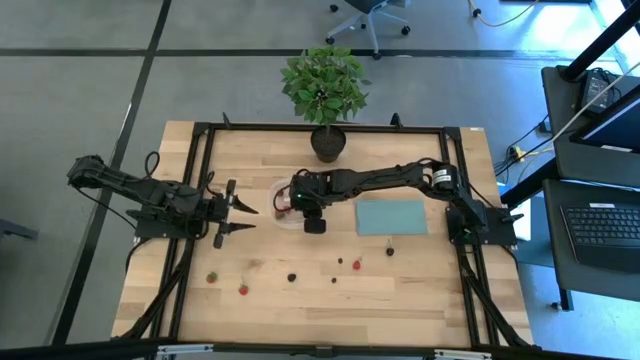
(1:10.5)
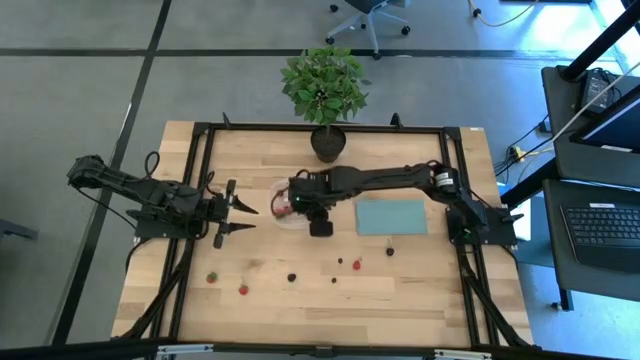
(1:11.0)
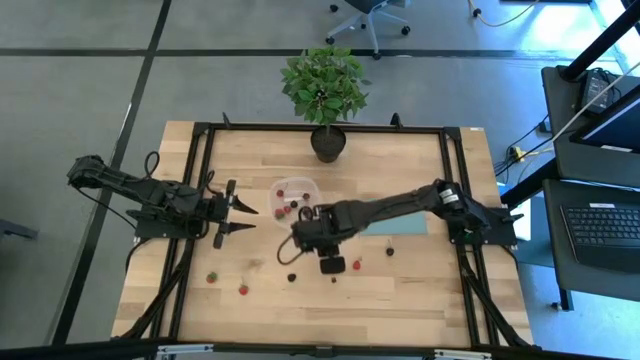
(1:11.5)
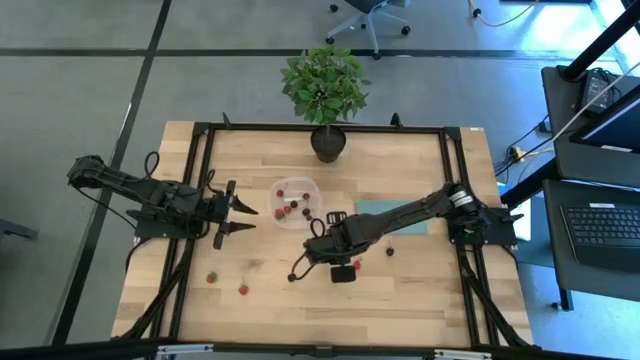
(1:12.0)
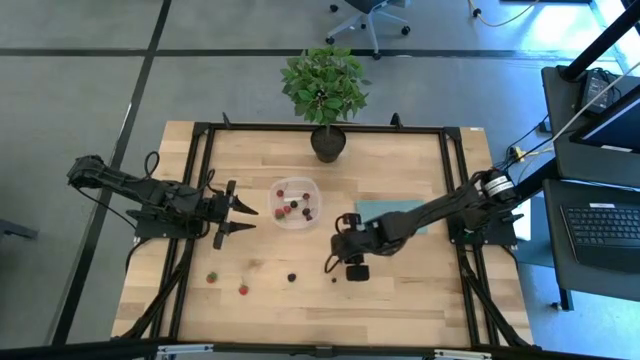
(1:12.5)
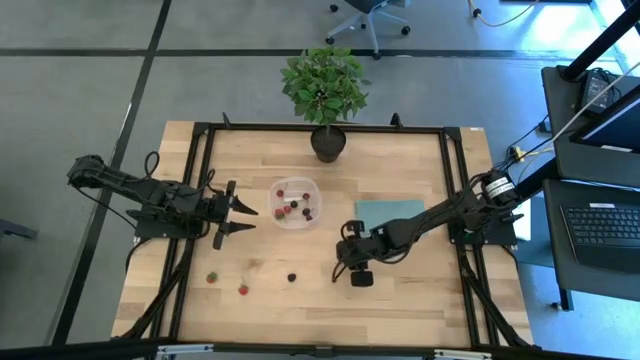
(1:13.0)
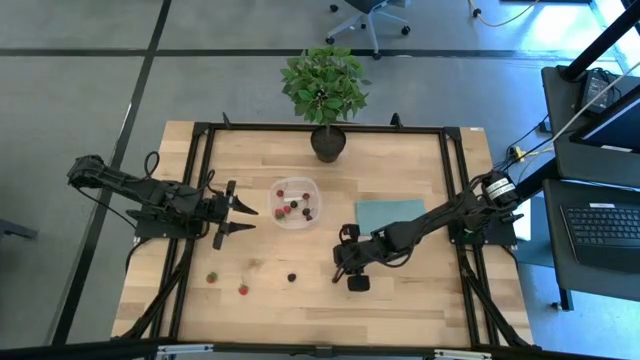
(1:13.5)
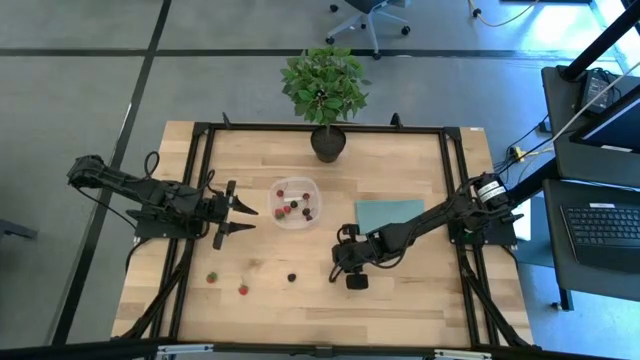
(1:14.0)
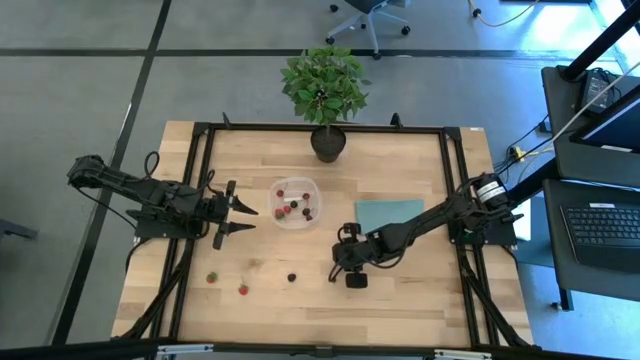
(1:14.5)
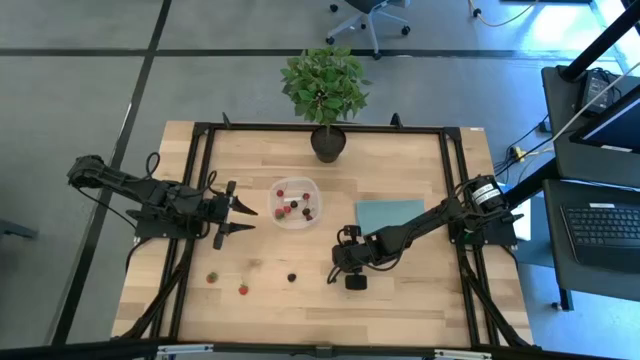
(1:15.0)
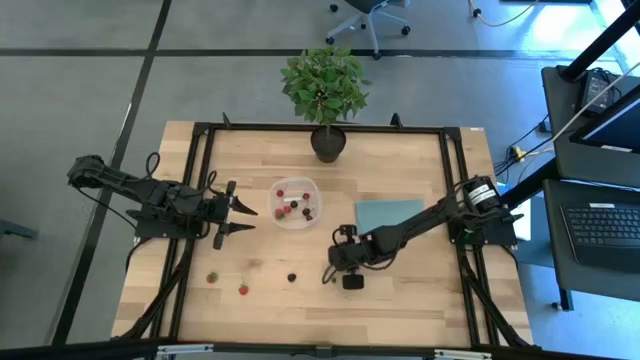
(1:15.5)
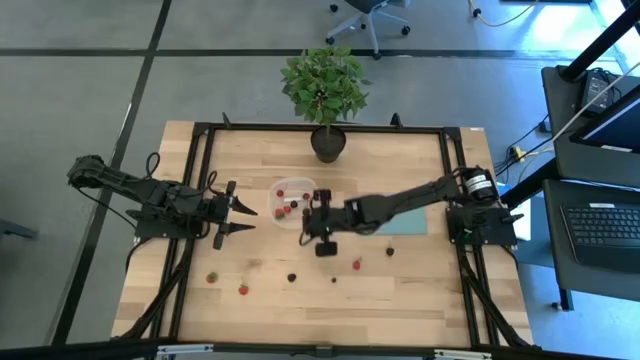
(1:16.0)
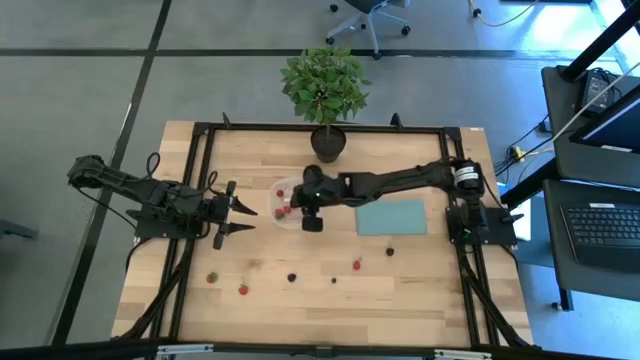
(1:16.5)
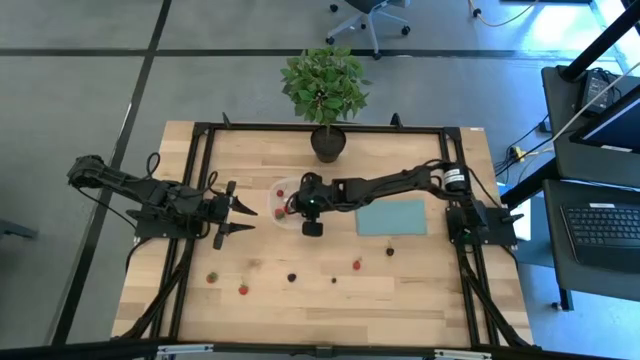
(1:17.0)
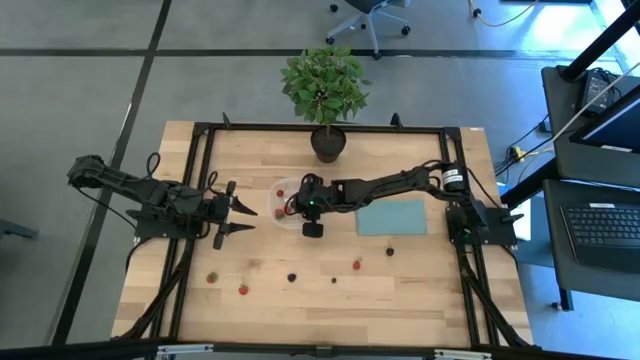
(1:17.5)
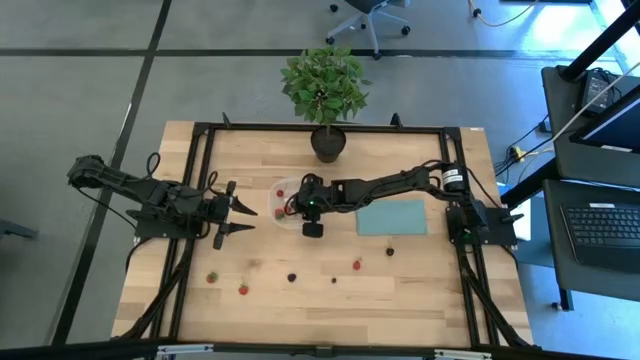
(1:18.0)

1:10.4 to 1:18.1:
Task: Pick and placing Produce into tupperware
Put the top blueberry into the container

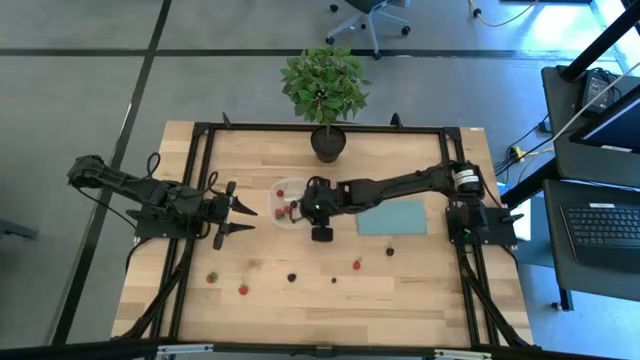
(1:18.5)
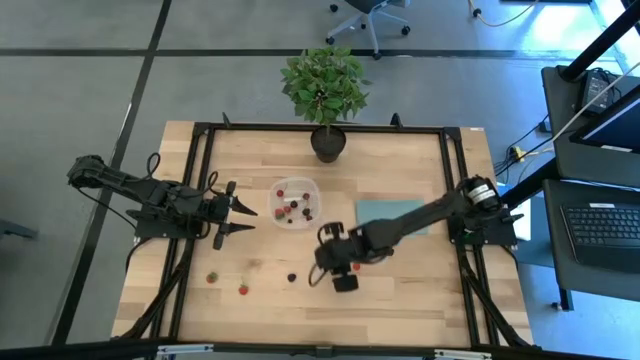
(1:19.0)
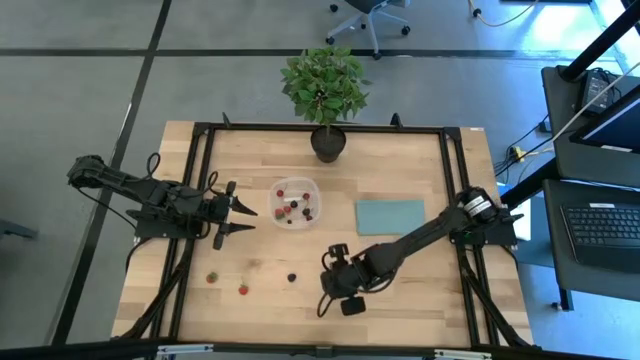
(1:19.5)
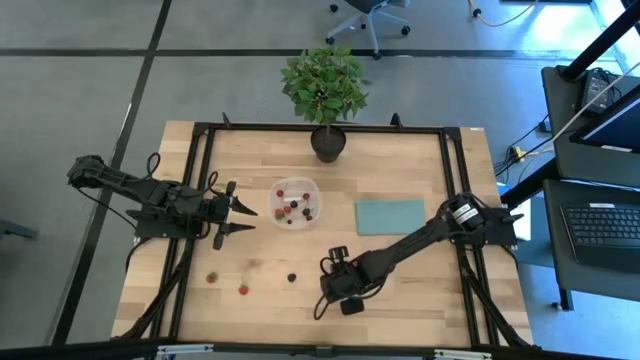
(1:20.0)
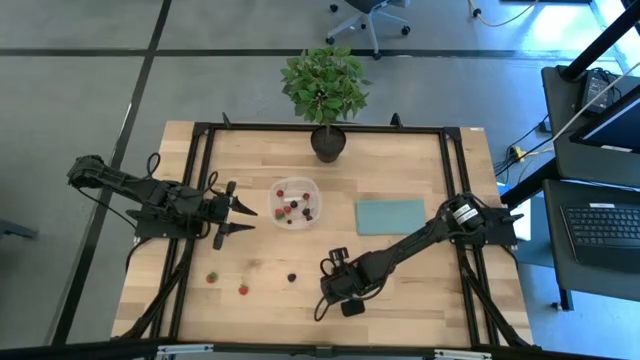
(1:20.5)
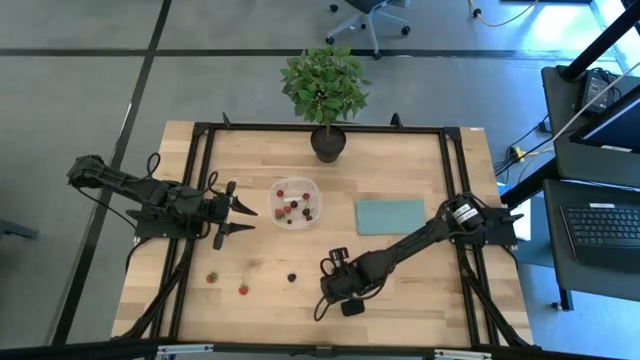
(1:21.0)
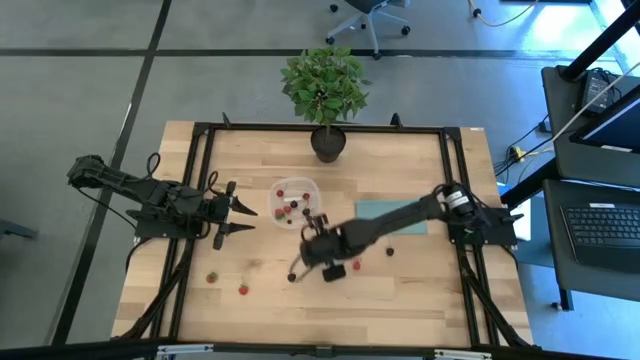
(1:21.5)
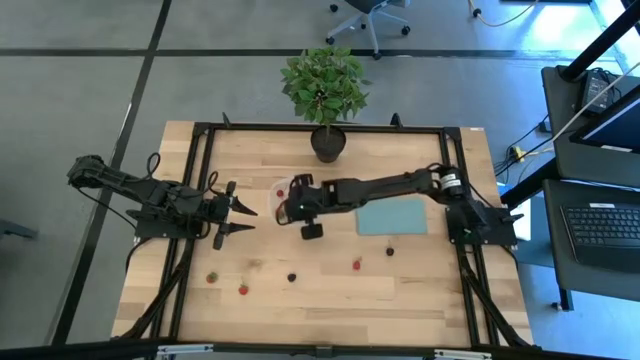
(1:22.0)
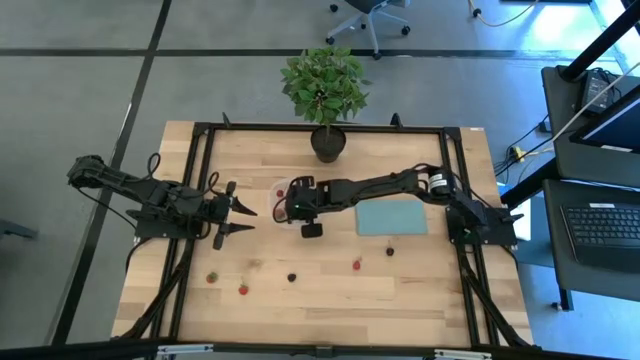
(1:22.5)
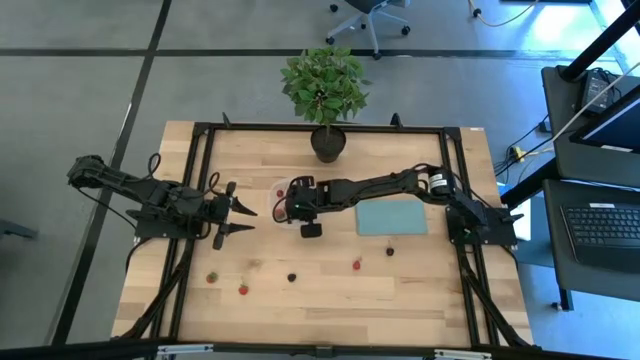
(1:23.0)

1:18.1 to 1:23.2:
Put the blueberry into the container

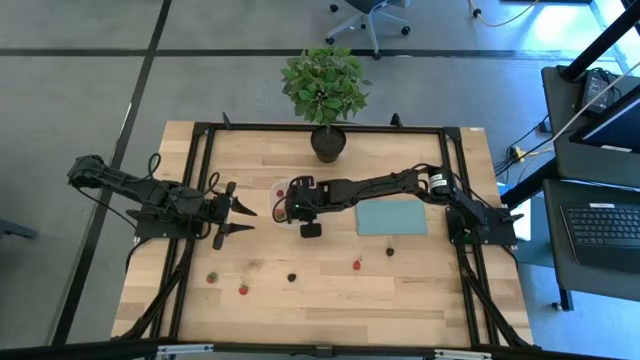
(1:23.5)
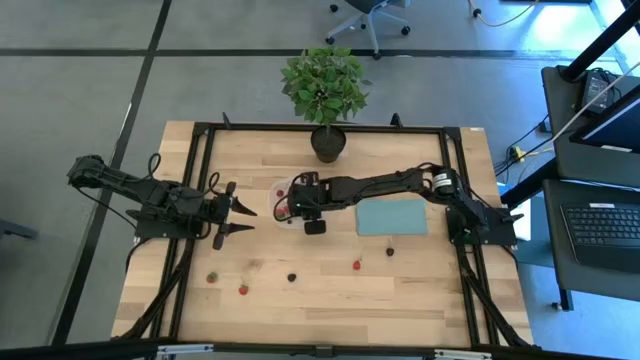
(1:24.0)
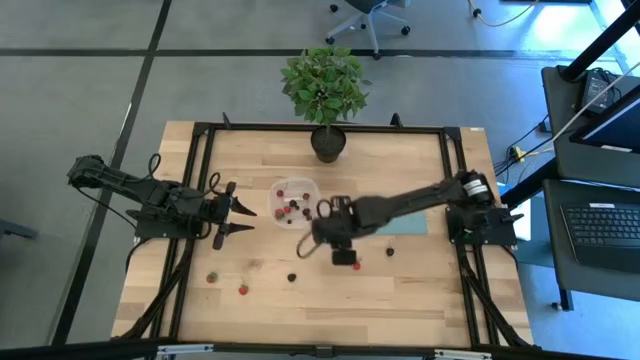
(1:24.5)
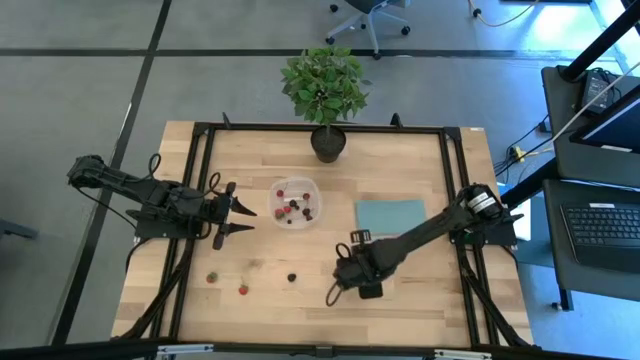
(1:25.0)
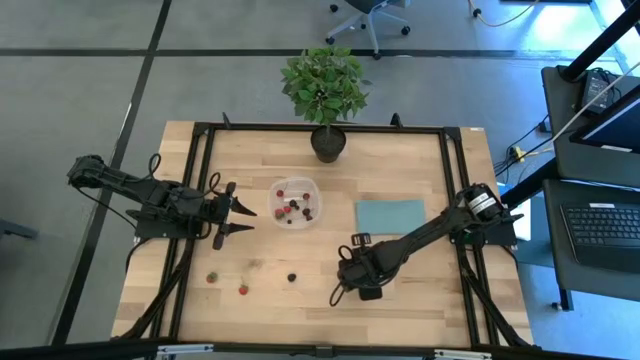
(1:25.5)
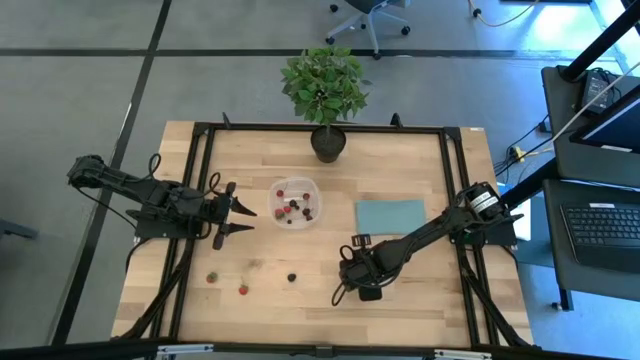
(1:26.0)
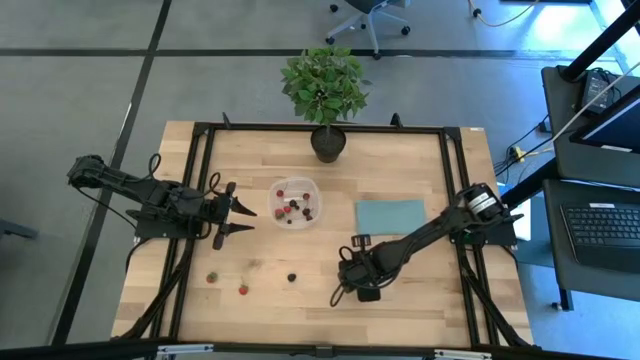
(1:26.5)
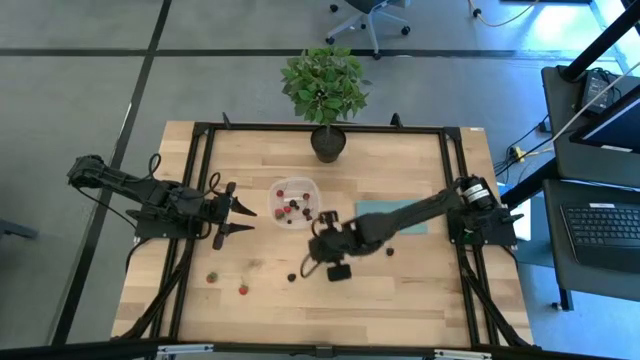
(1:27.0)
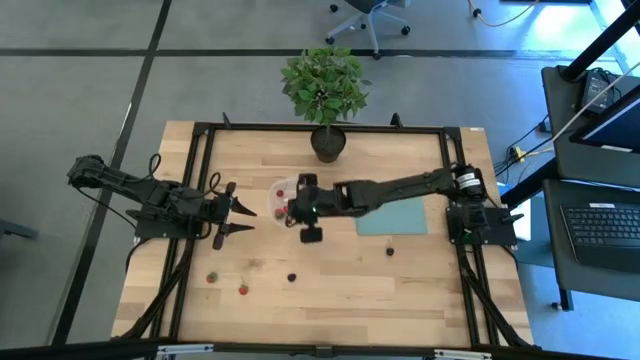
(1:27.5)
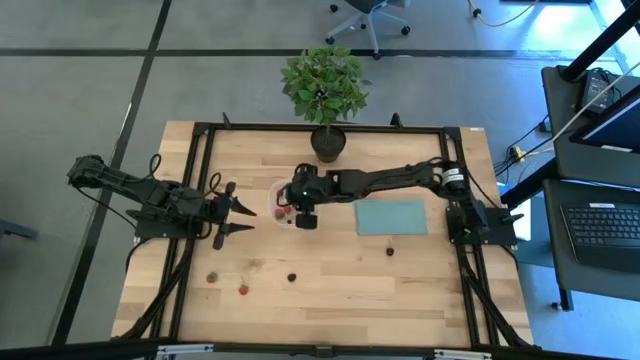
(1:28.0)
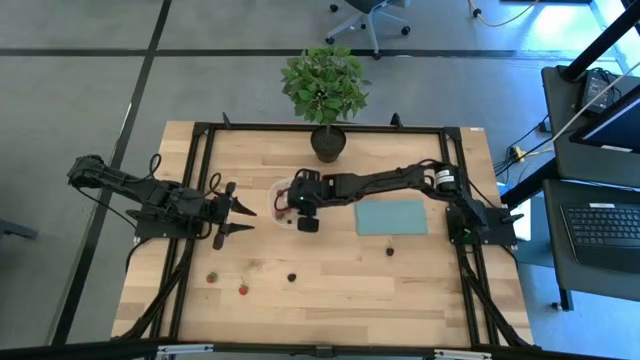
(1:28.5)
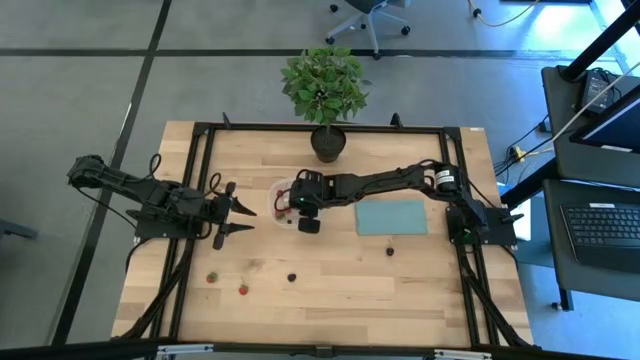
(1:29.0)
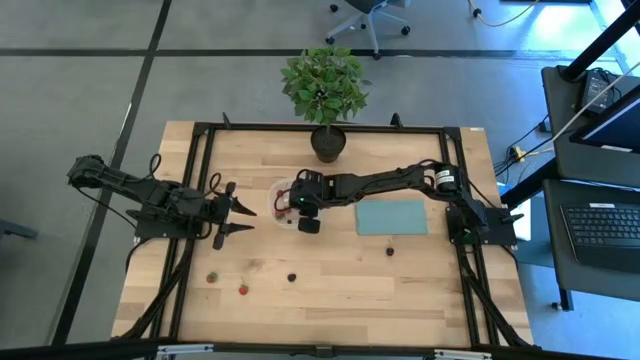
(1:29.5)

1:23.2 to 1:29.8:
Put the raspberry into the container

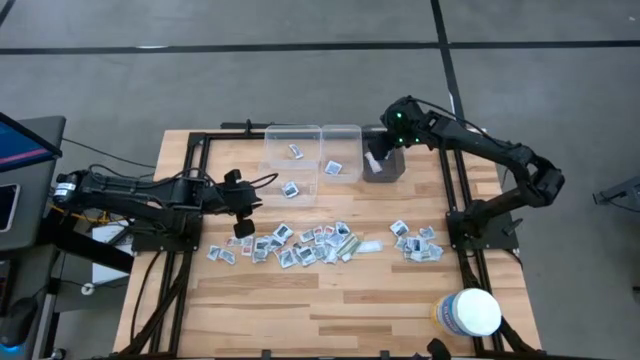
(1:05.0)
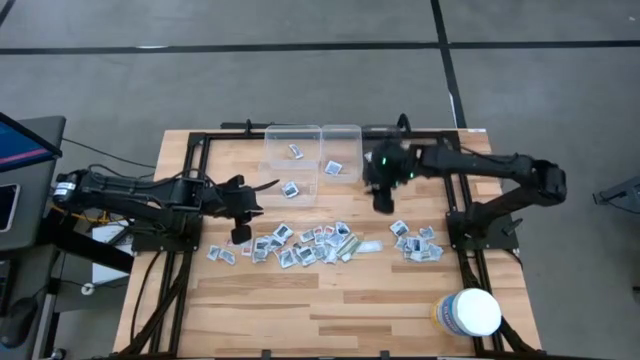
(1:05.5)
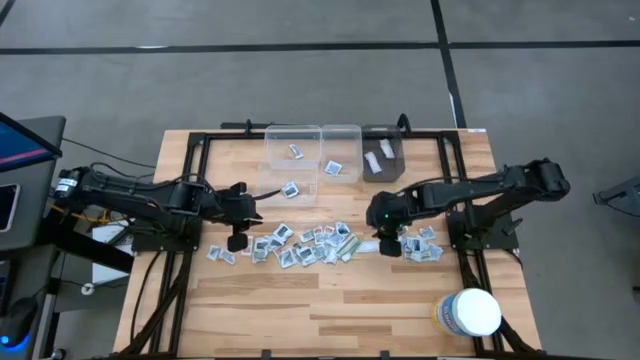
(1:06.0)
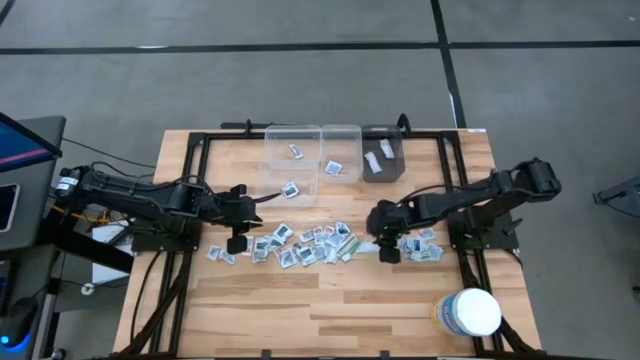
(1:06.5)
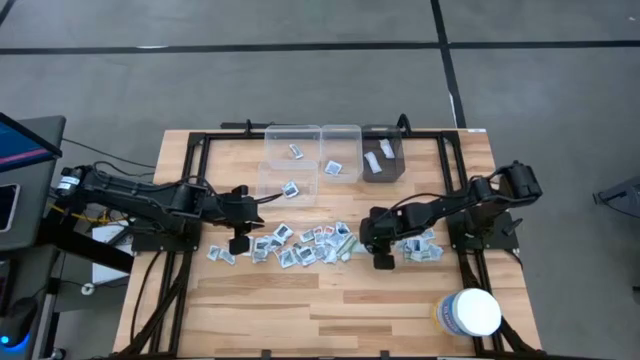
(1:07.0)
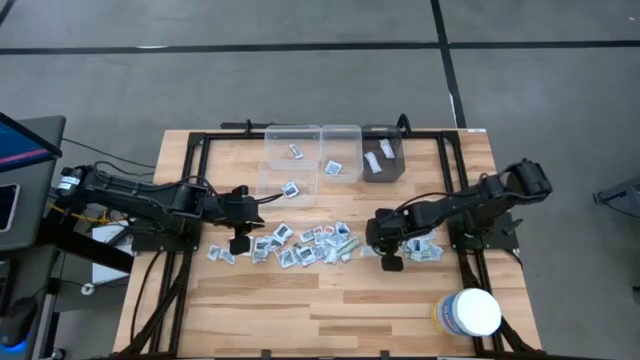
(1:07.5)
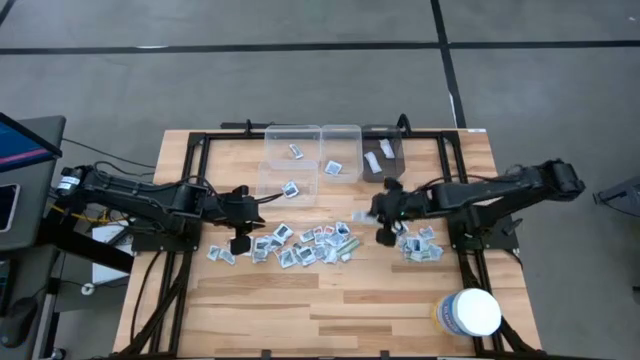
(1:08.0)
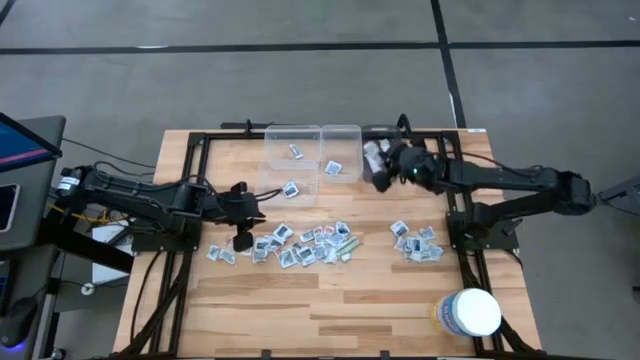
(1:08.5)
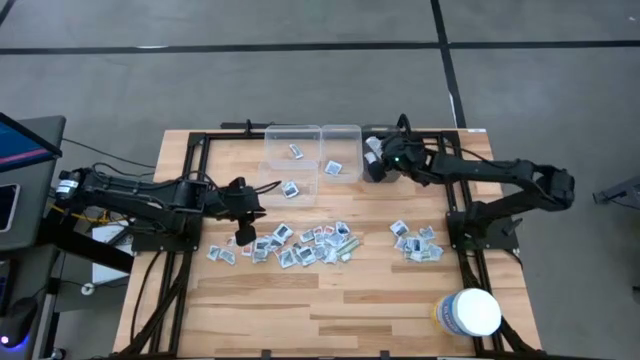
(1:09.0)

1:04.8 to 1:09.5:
Task: Pick & Place First Aid Supplies
Put the bandage pack into the black transparent bin
